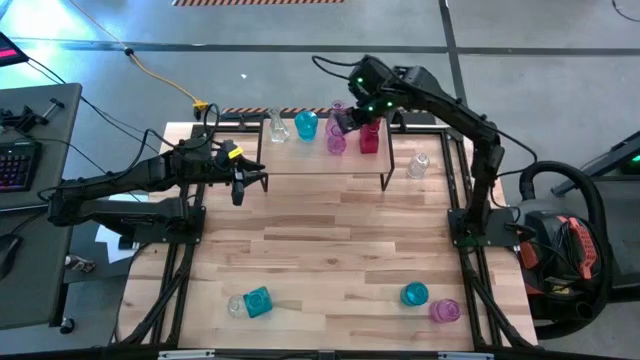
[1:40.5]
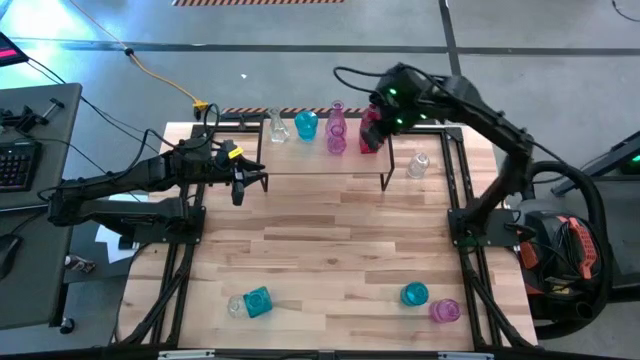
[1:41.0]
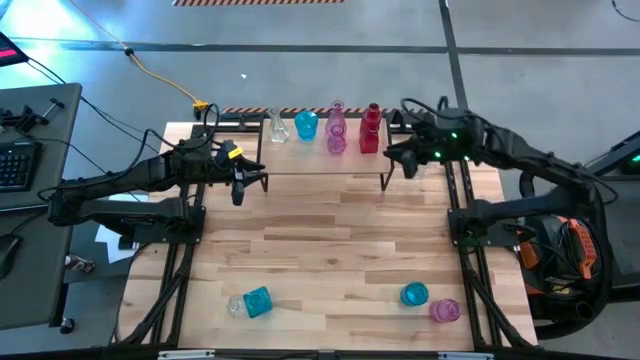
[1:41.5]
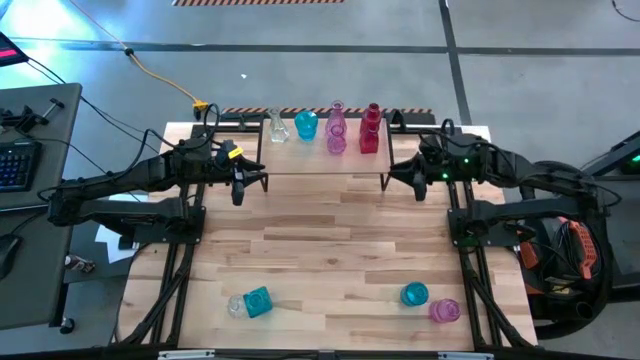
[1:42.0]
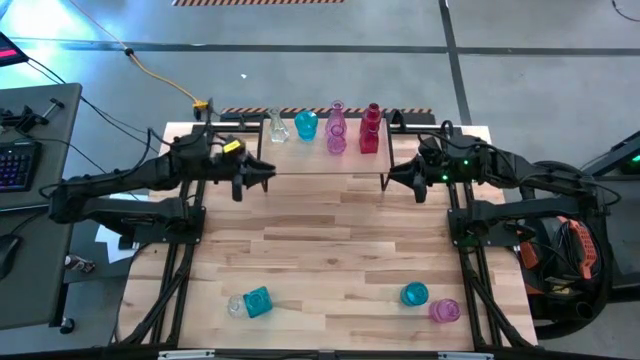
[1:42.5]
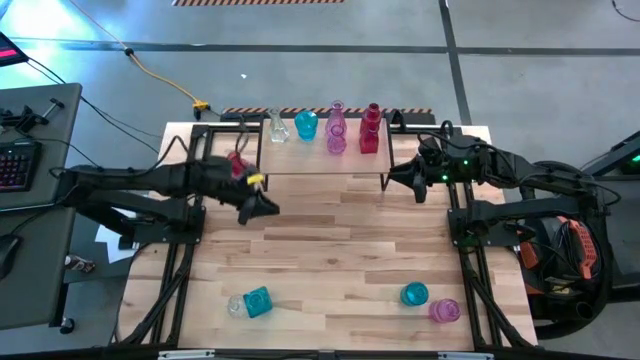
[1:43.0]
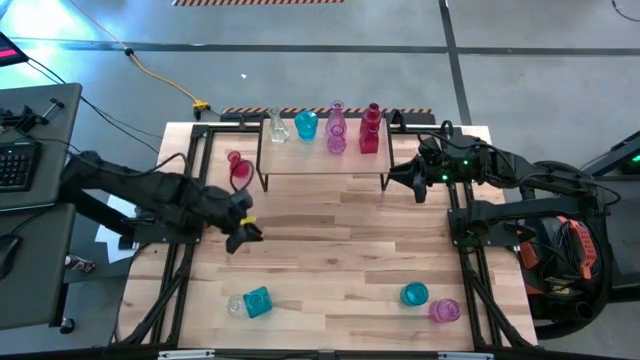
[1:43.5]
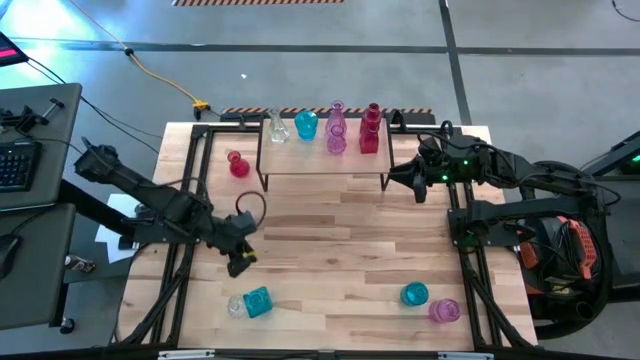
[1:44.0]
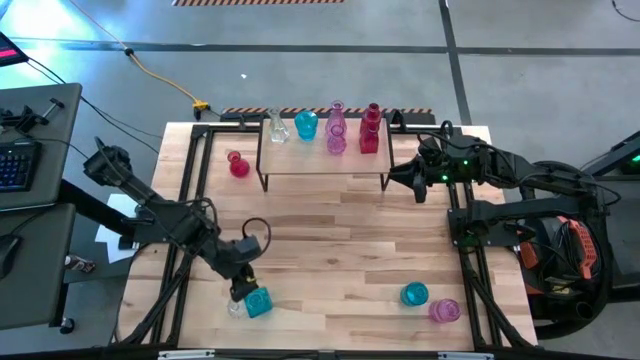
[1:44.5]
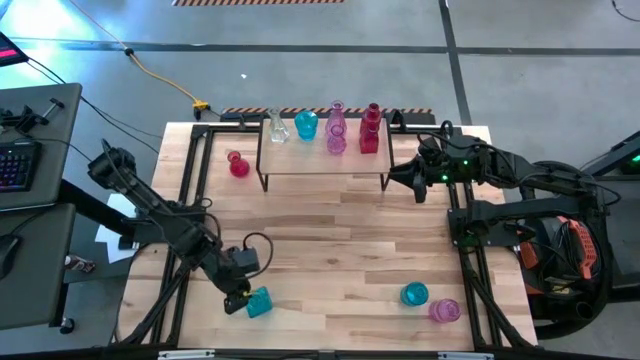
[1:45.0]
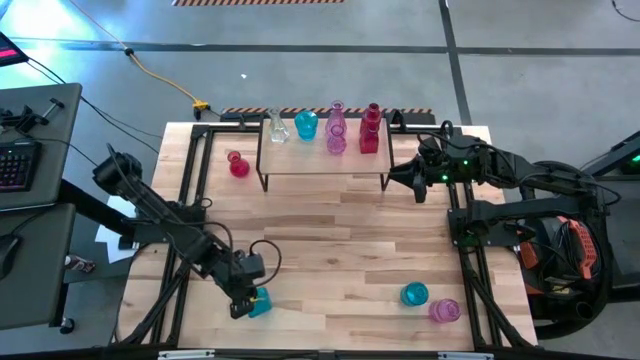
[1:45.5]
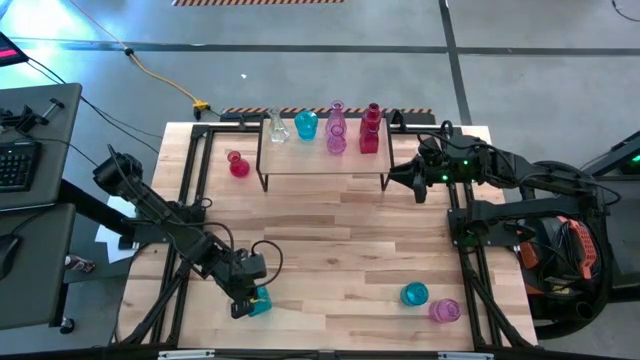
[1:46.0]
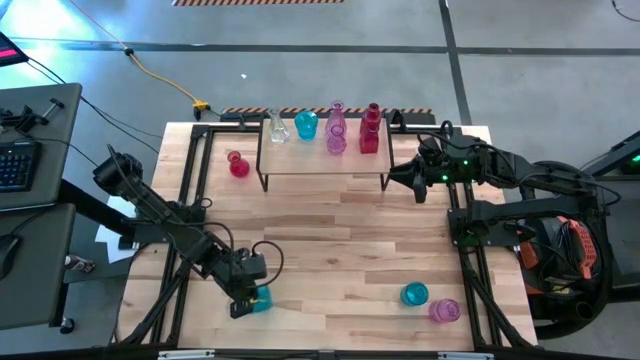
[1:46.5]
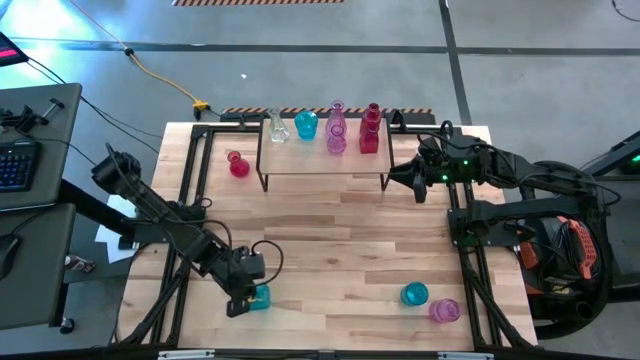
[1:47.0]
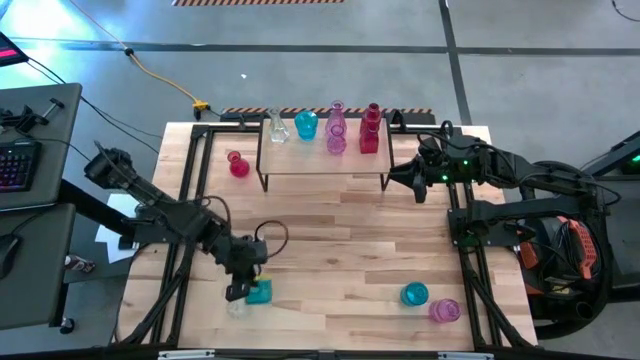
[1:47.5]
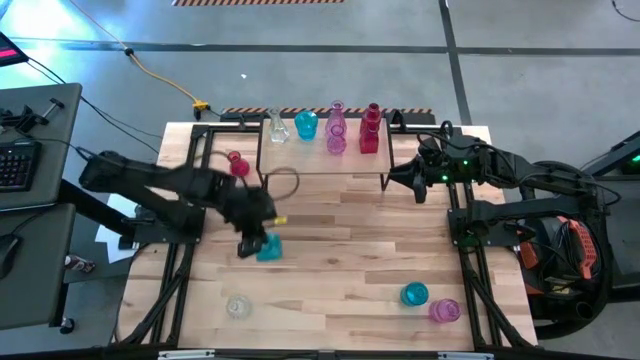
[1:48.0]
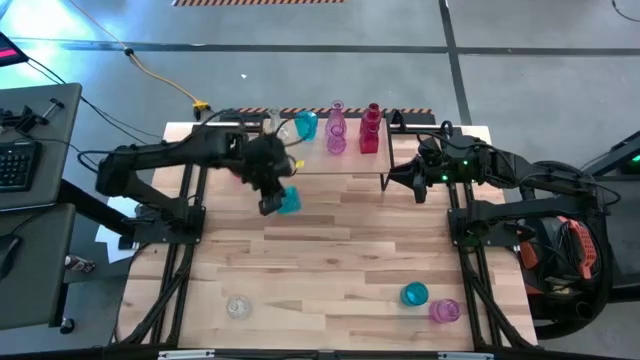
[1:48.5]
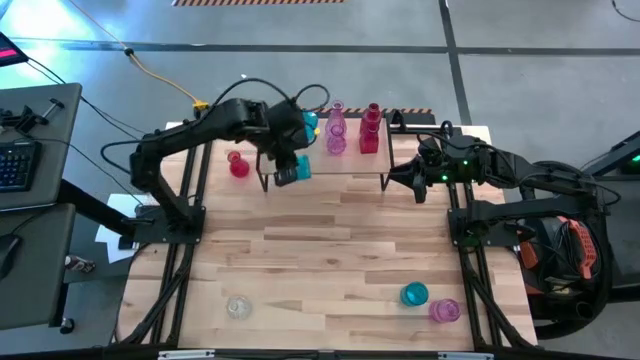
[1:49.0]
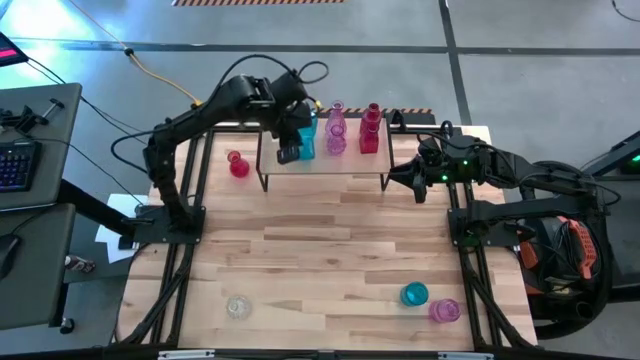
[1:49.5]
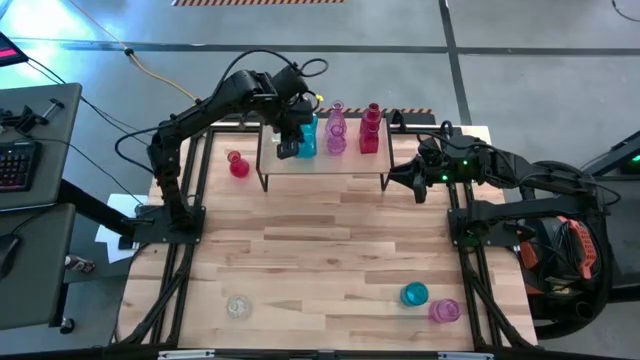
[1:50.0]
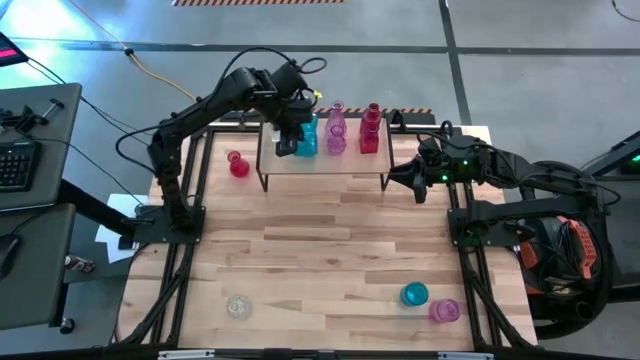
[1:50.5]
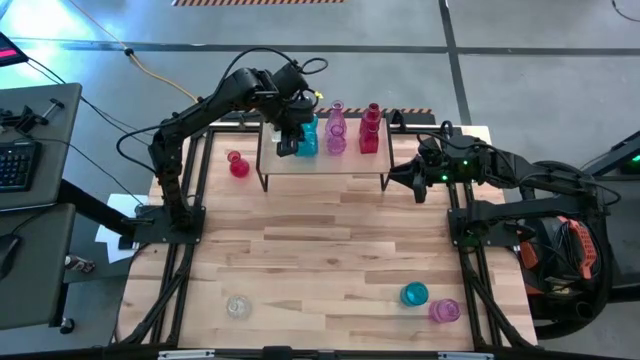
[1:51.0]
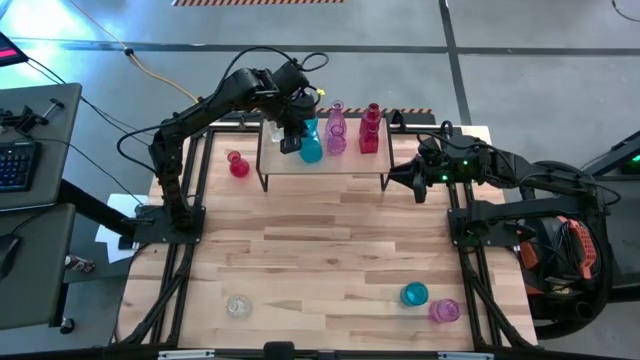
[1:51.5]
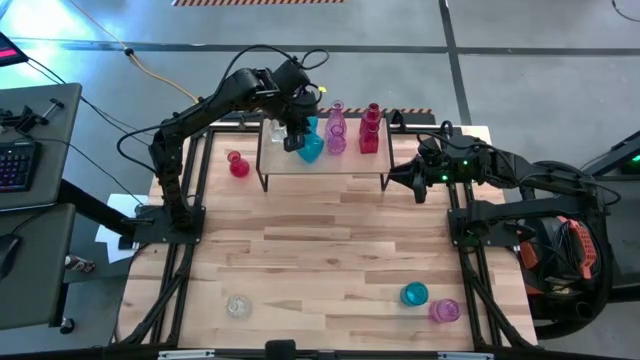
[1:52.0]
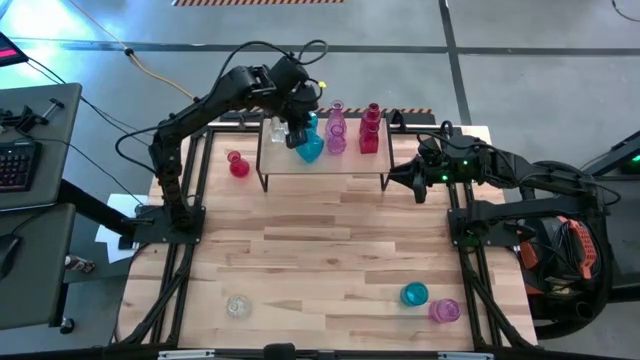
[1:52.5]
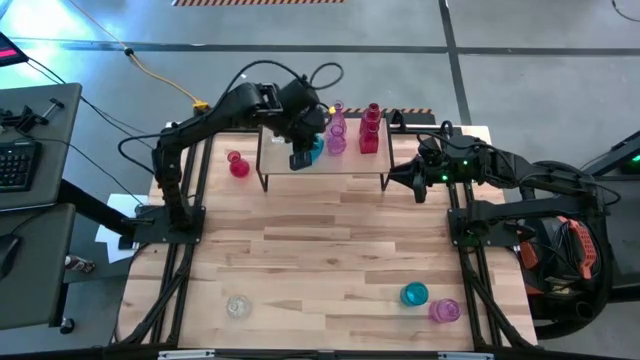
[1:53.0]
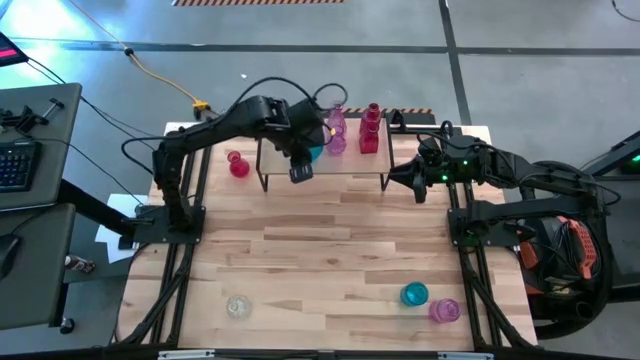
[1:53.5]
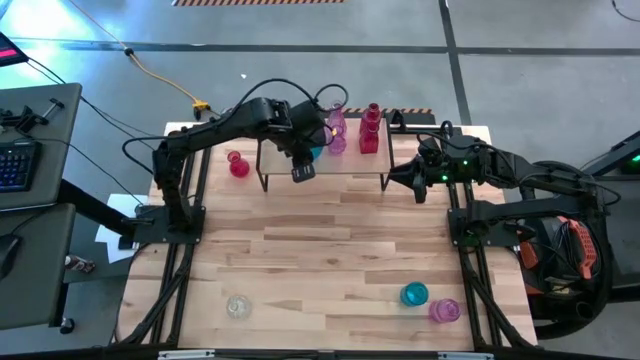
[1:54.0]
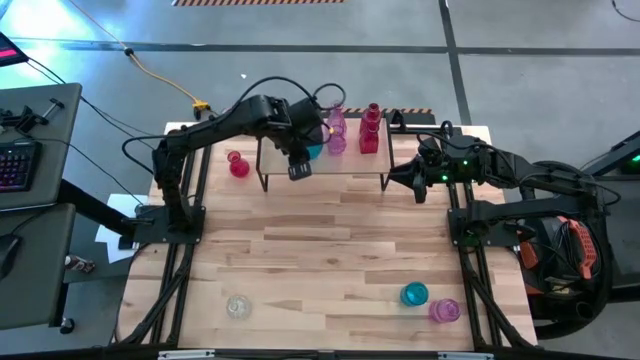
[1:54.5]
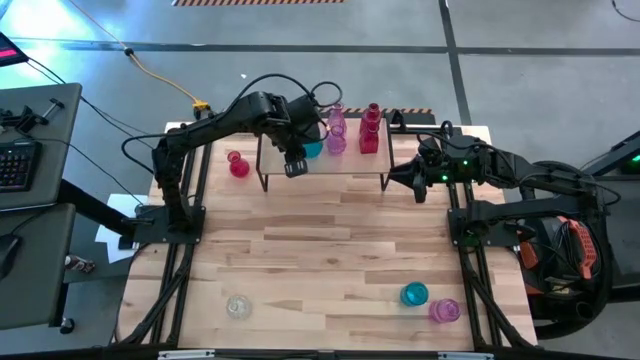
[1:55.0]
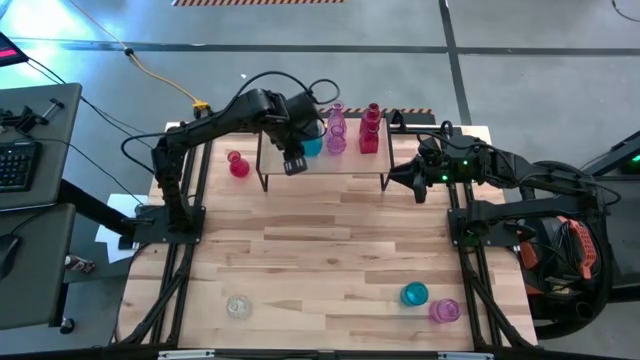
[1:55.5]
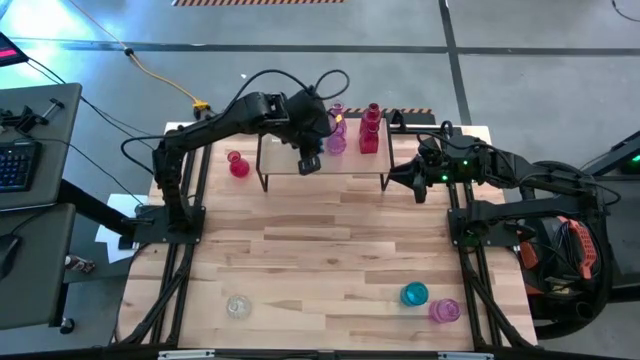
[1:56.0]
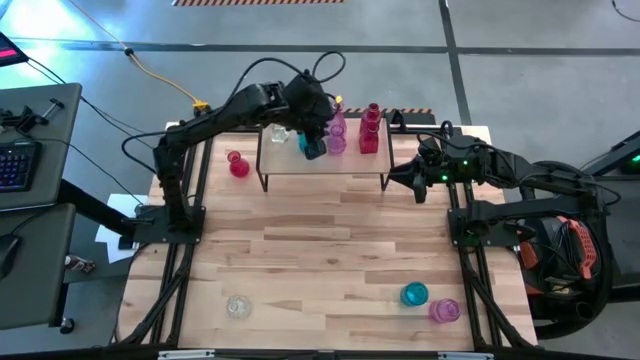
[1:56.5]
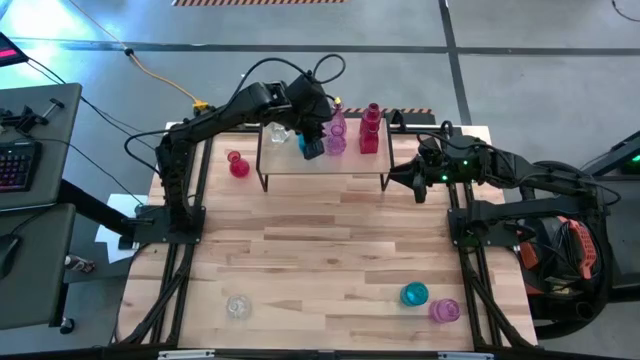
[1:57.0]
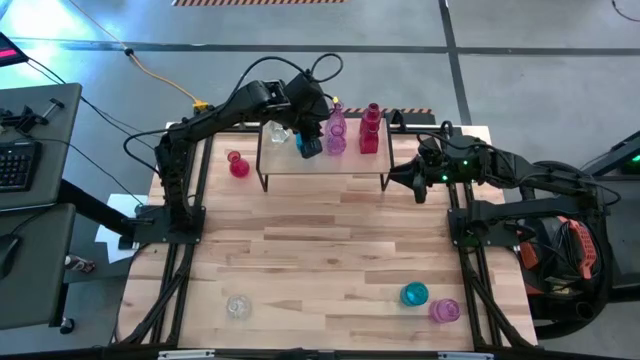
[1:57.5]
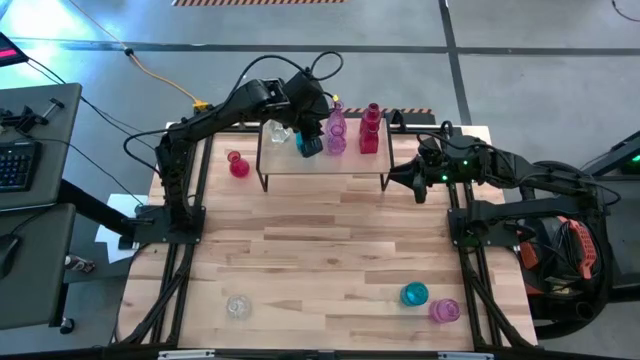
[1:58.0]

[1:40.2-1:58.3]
Task: sort vases onto shelf
Put the left blue flower vase on the shelf aligned with the other blue flower vase
